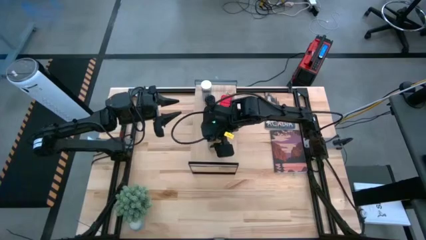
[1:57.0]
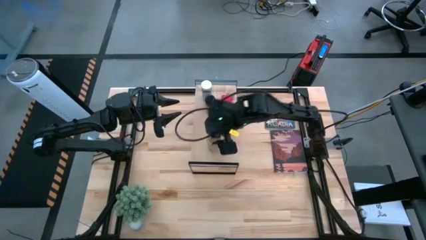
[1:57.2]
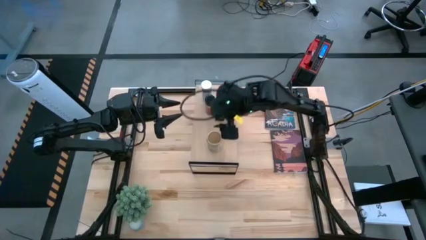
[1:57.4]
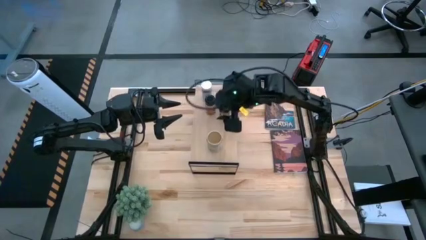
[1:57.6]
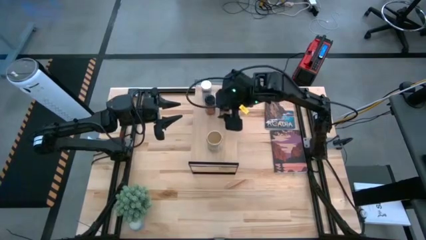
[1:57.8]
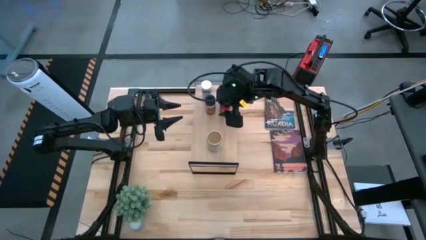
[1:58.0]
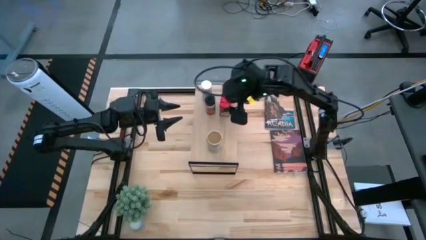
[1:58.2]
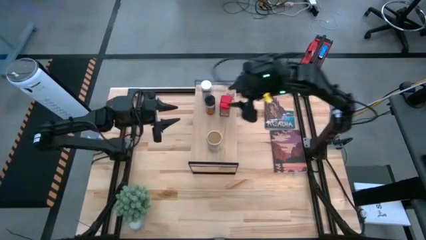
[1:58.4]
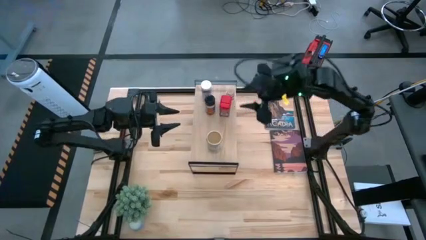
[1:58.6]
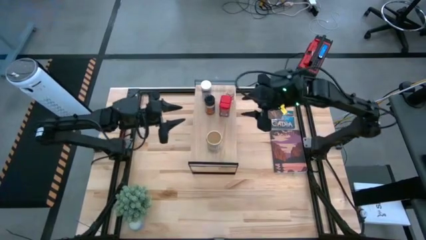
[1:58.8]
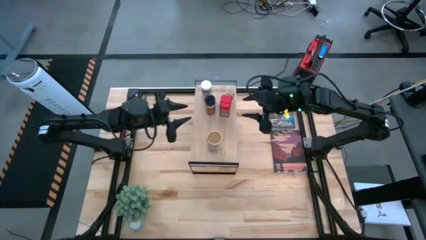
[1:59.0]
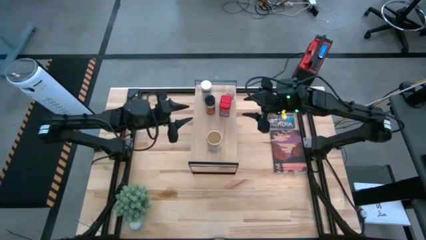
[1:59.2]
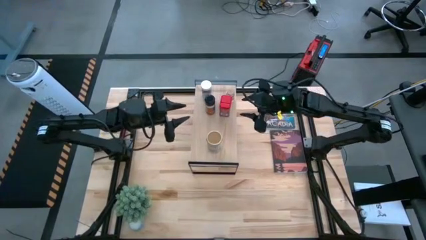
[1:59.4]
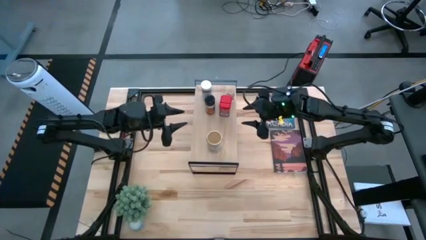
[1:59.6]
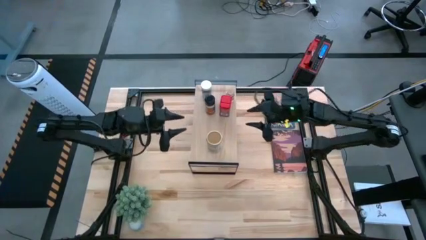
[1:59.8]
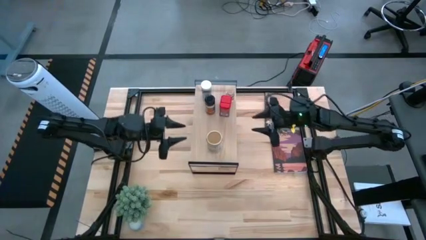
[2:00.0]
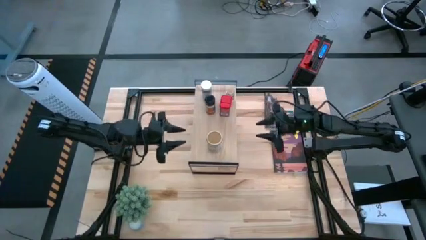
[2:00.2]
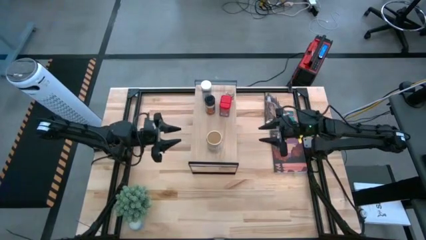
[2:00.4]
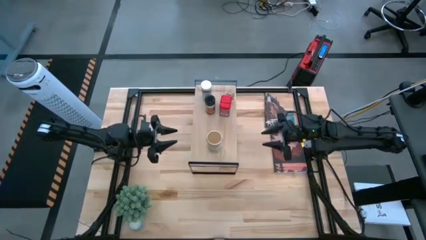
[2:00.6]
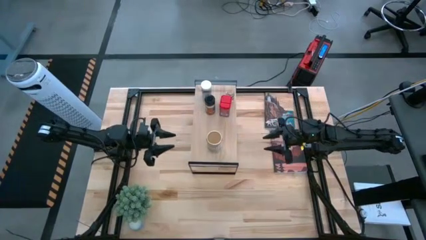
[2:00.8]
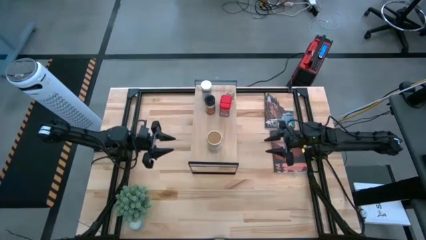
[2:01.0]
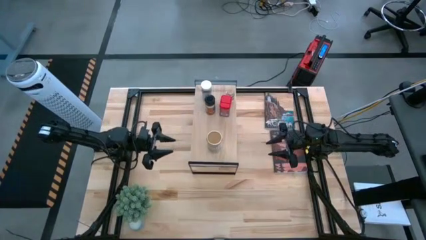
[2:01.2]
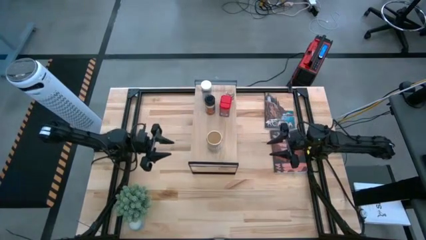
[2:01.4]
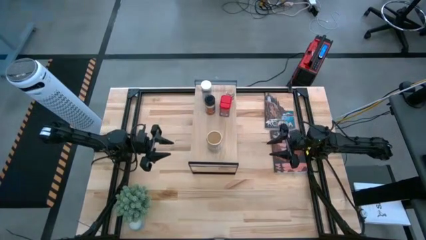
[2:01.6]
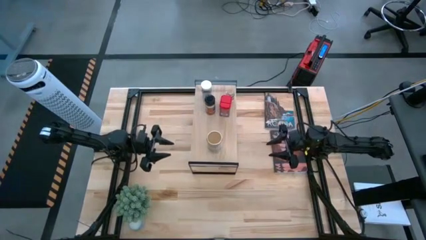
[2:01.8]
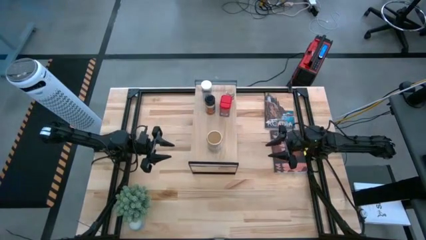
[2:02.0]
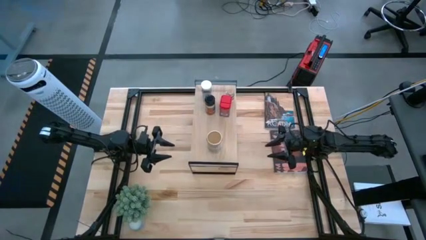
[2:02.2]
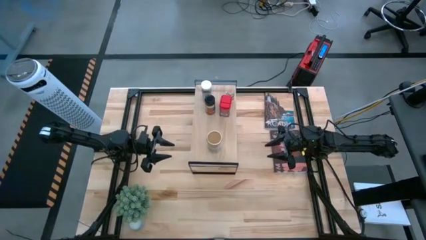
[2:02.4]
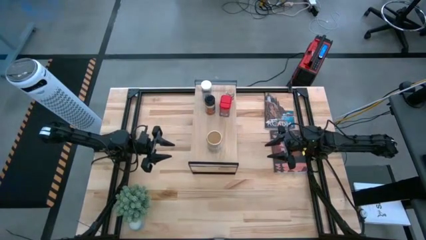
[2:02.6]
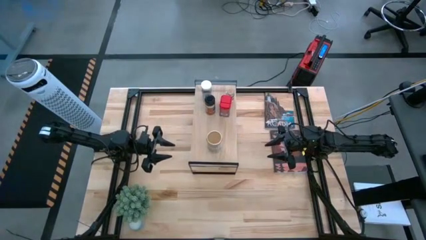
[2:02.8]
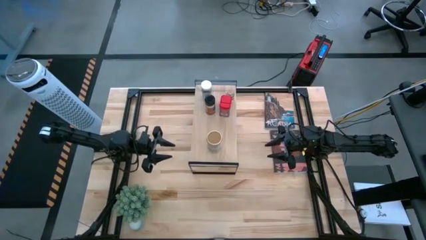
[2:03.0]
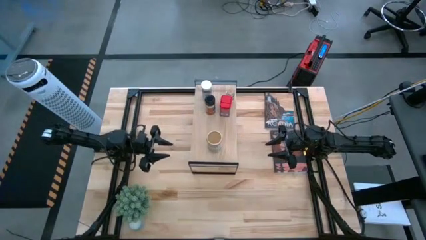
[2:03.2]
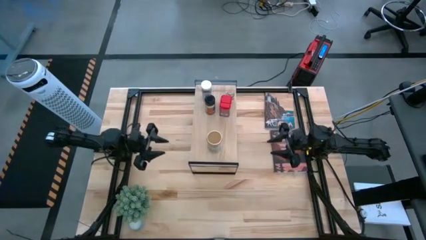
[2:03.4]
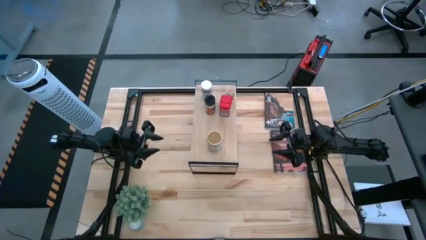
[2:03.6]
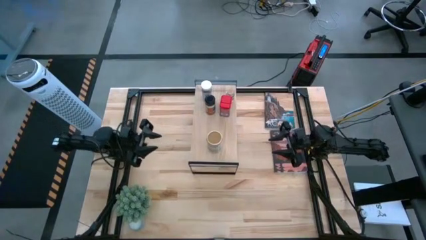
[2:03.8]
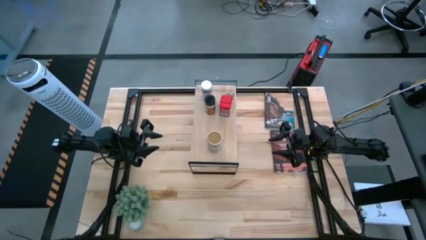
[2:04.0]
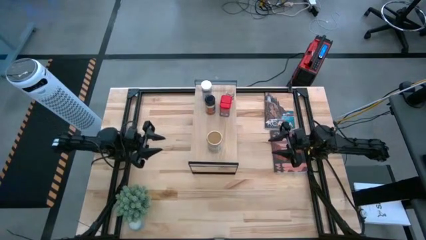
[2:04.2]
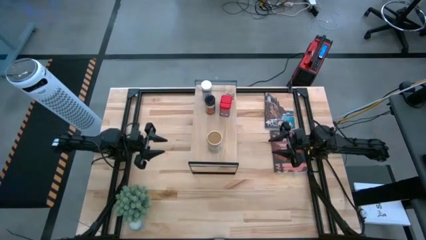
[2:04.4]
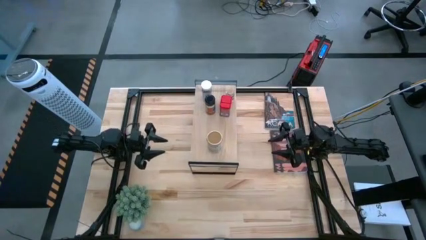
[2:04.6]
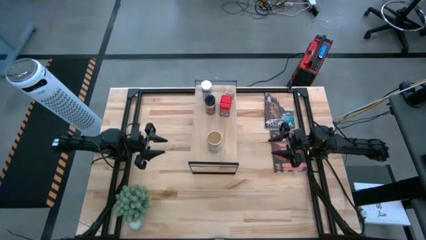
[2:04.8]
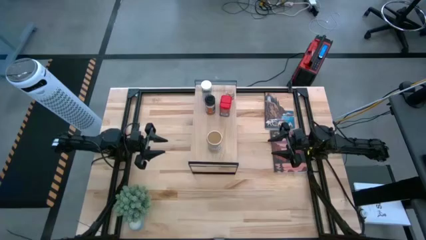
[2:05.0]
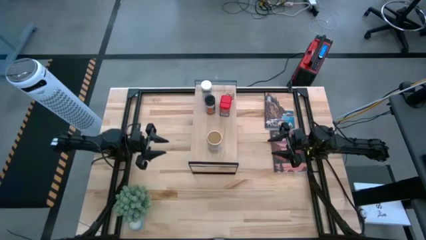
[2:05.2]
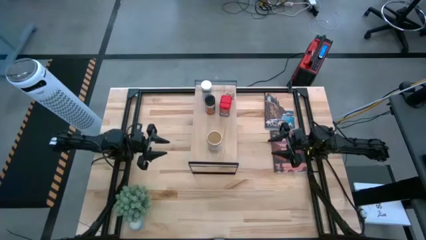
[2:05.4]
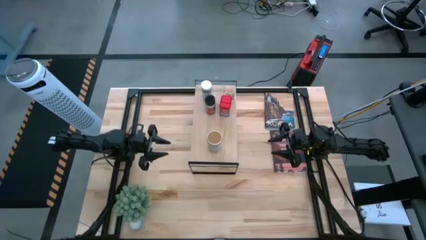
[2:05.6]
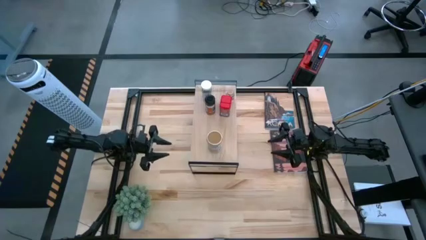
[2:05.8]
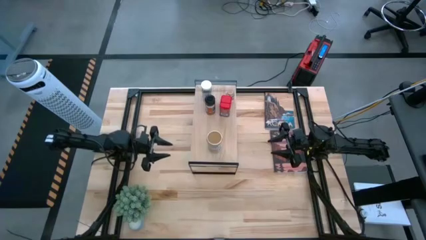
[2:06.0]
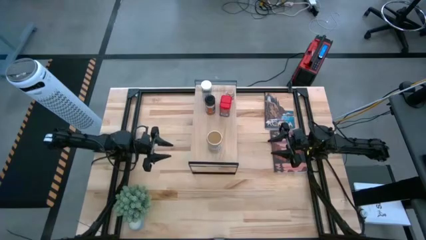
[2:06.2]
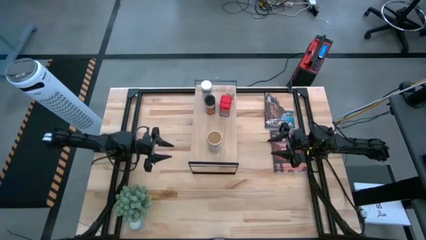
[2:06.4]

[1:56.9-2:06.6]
Task: Shelf spices
Return to Home Position

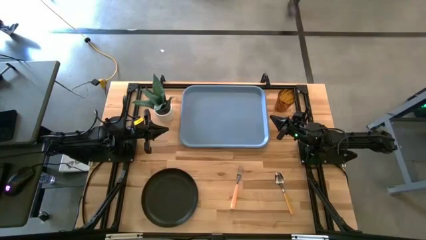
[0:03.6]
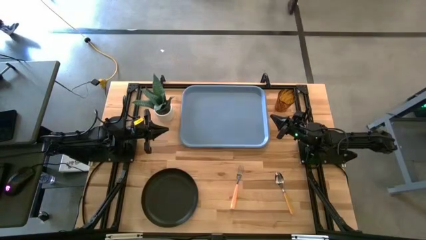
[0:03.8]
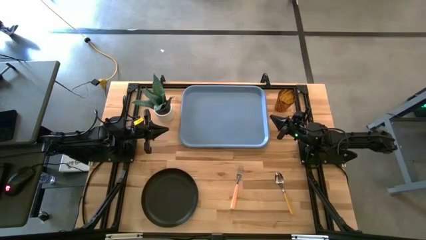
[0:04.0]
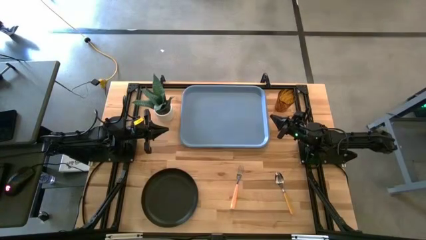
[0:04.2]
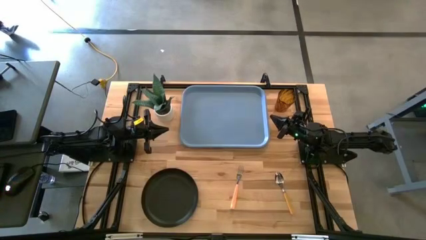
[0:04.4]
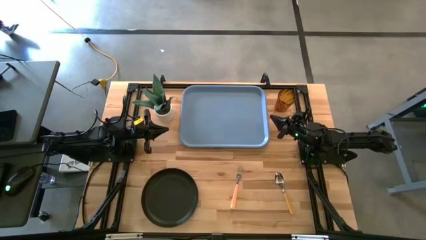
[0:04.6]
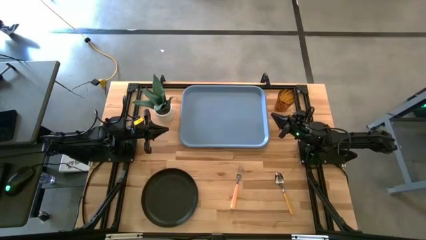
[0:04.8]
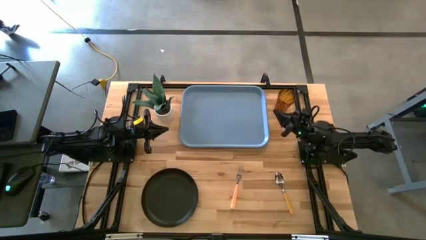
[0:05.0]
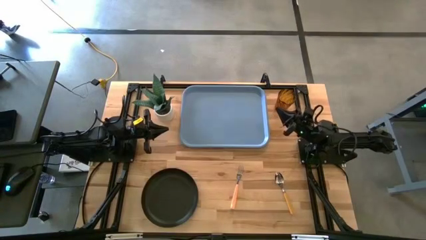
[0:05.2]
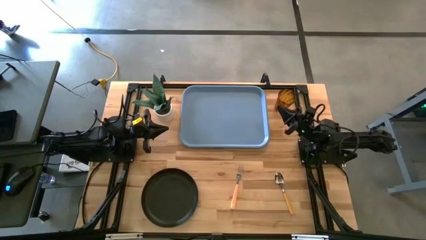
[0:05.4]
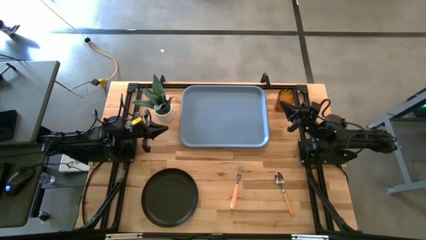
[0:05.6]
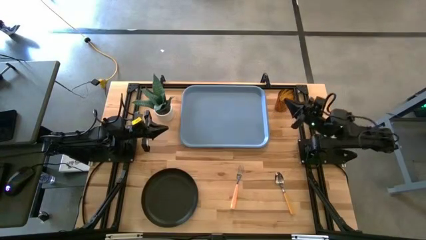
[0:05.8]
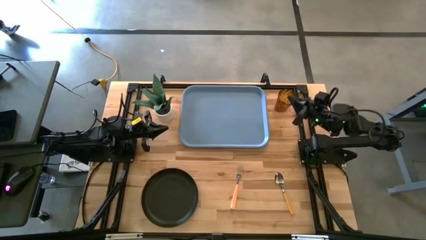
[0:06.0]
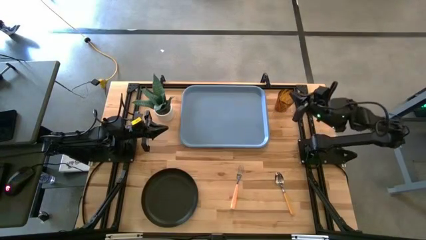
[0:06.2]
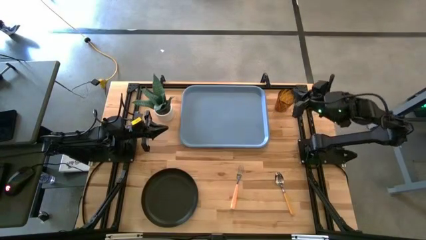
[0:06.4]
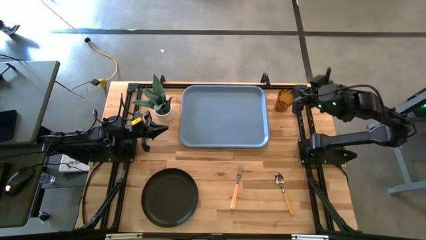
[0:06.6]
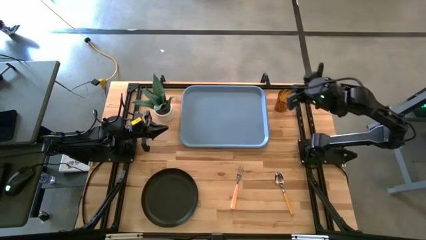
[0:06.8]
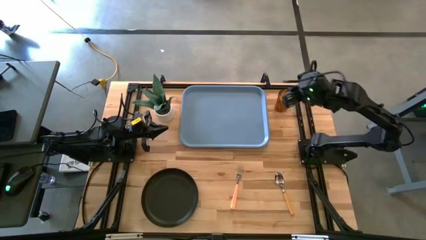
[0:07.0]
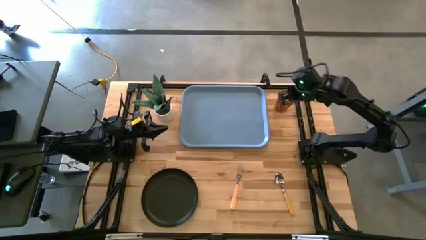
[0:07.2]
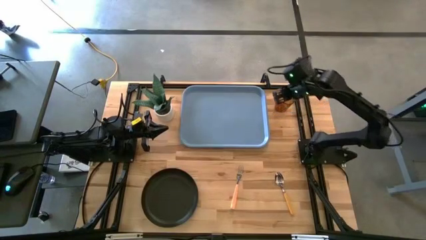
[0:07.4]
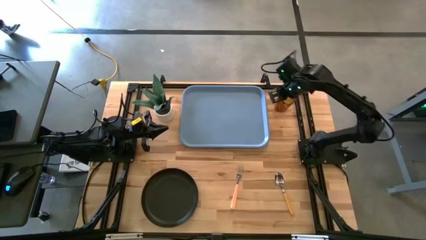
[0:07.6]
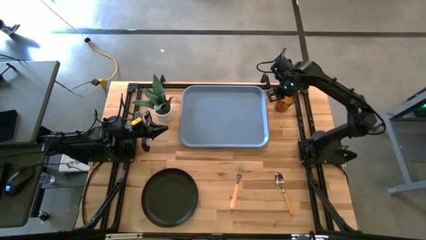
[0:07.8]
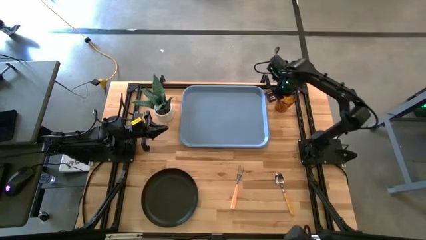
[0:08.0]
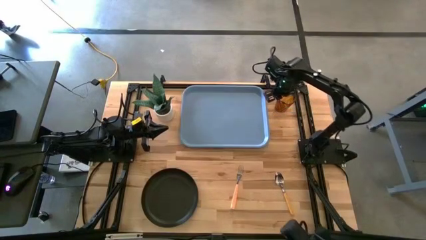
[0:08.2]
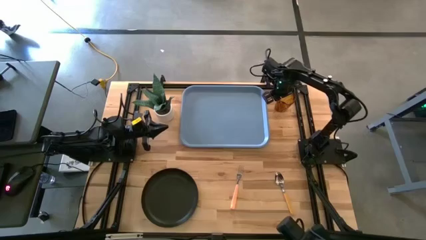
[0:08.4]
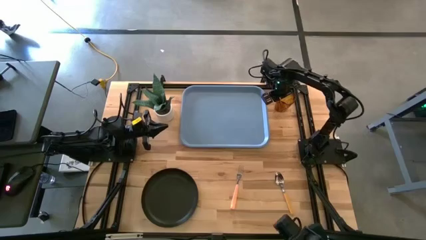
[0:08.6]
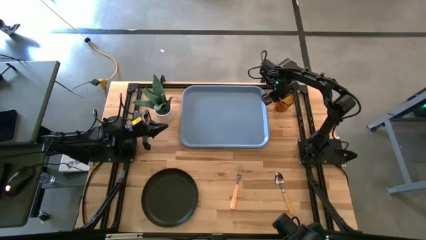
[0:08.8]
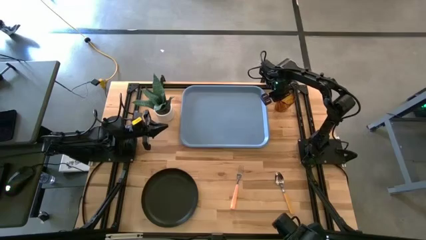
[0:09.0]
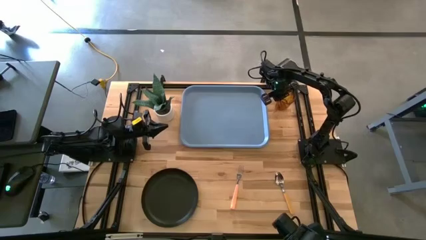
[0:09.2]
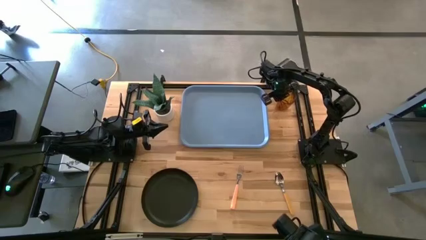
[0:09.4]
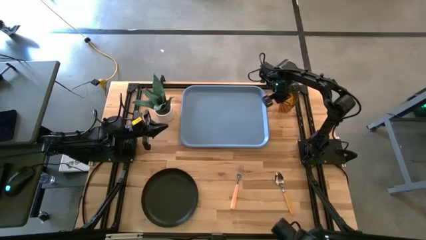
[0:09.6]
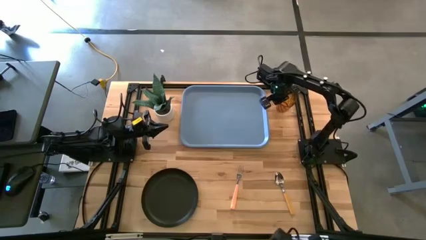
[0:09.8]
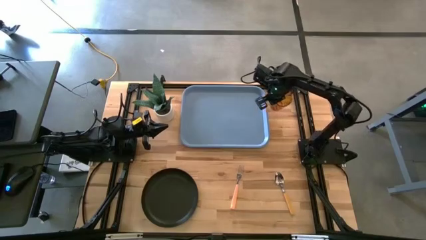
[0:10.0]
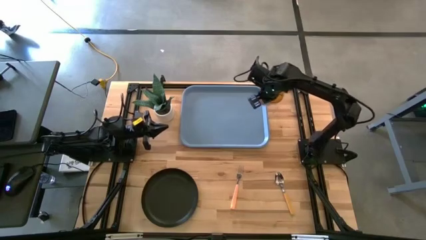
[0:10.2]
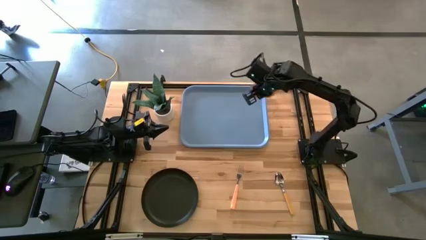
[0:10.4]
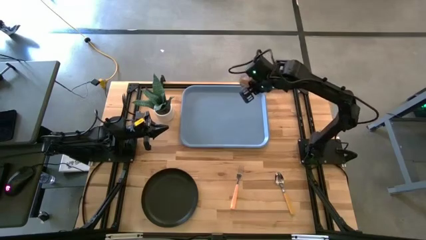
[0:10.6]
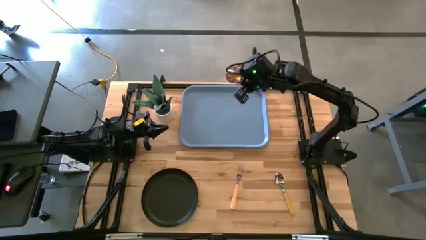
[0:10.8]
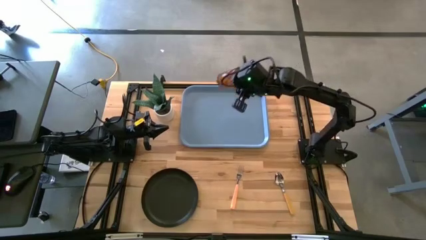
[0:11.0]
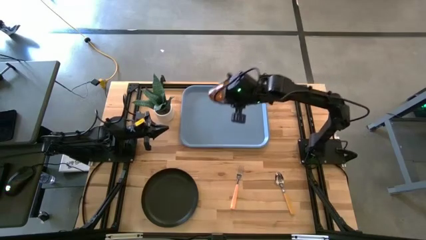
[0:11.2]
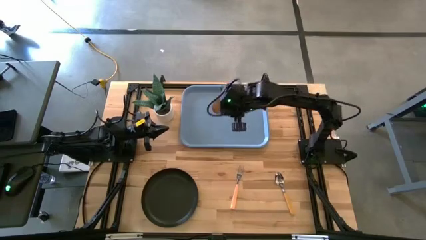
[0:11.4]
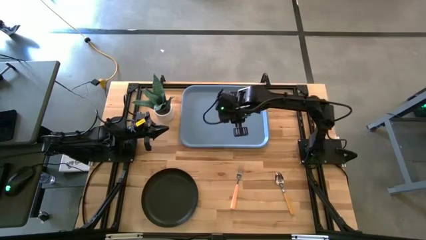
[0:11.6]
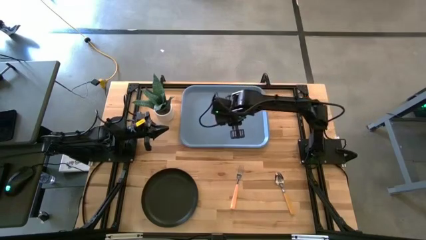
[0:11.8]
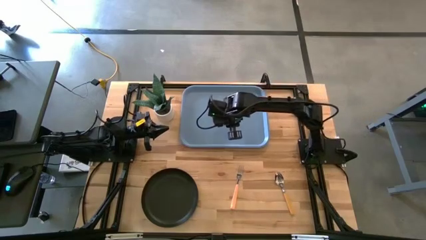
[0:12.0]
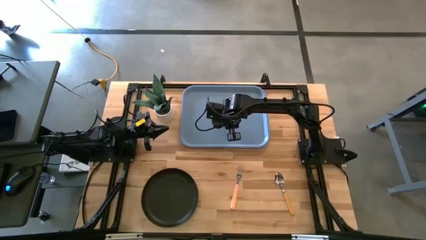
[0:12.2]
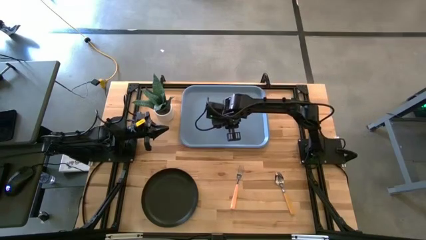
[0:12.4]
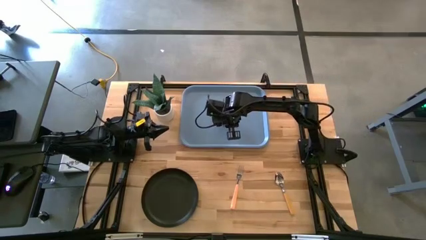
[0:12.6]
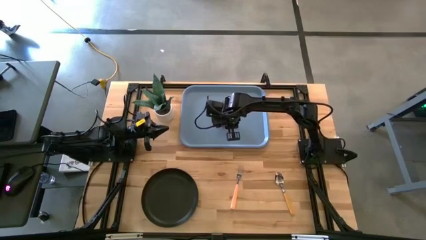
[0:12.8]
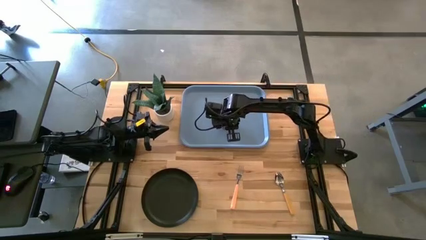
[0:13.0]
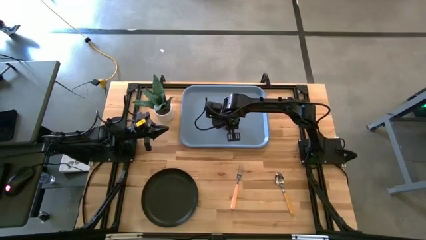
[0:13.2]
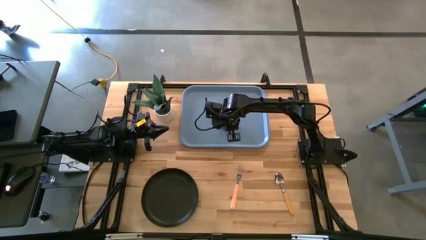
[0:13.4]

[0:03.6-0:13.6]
Task: Pick and place plate/cup/fork/spoon on tray
Put the yellow glass on the blue tray
